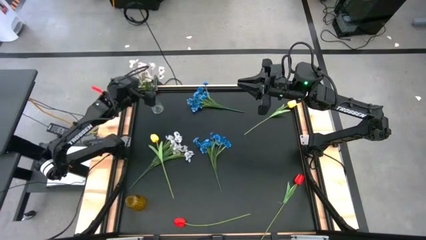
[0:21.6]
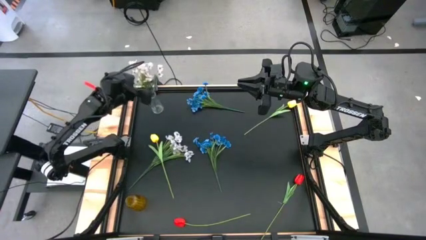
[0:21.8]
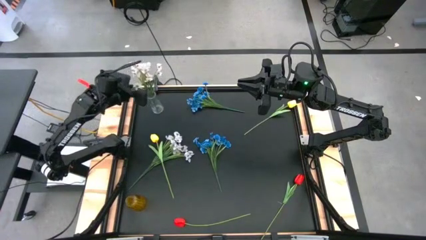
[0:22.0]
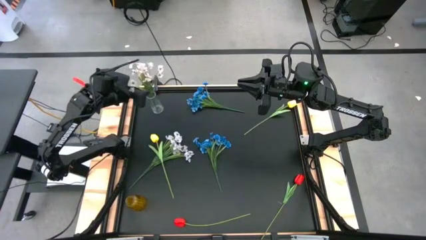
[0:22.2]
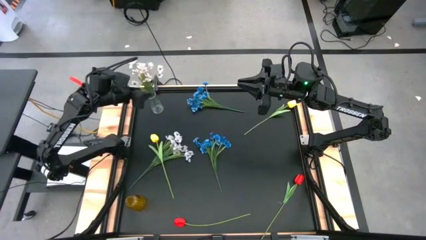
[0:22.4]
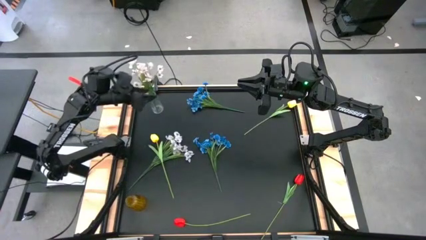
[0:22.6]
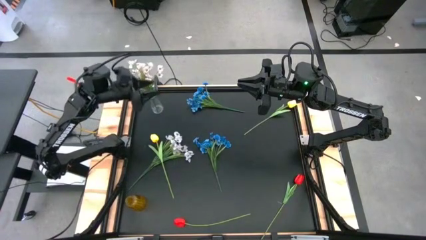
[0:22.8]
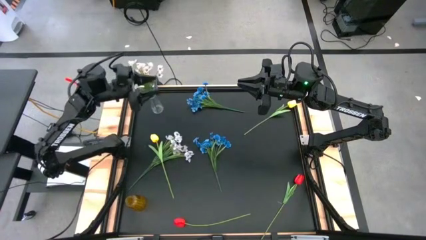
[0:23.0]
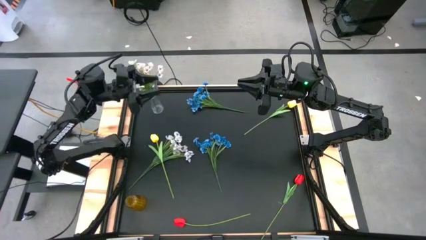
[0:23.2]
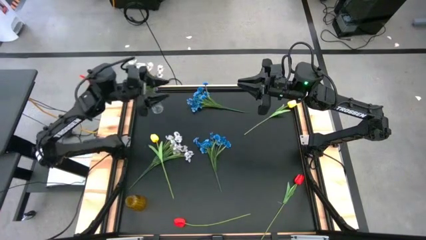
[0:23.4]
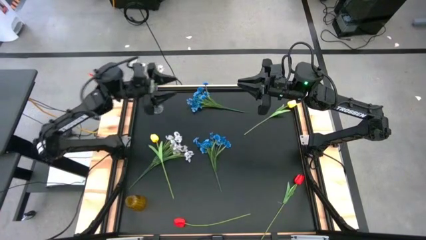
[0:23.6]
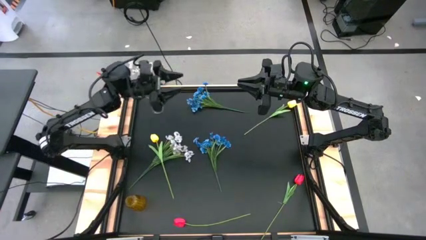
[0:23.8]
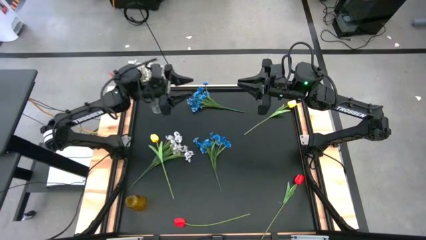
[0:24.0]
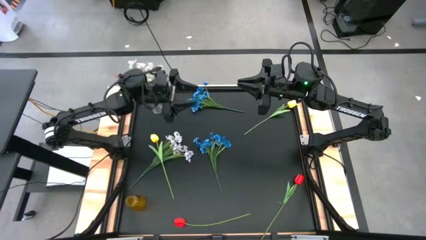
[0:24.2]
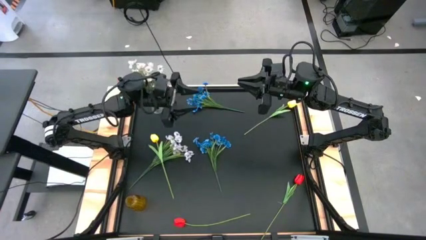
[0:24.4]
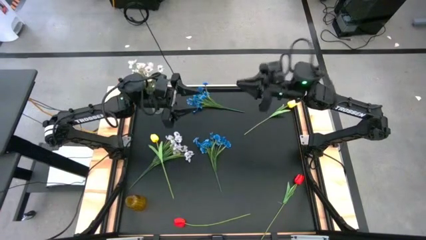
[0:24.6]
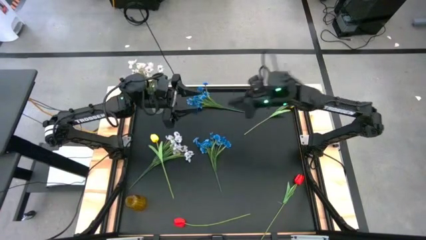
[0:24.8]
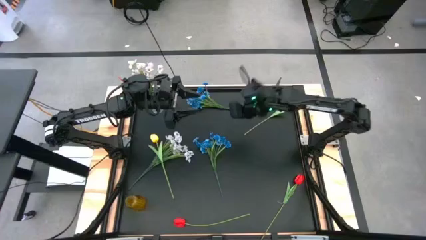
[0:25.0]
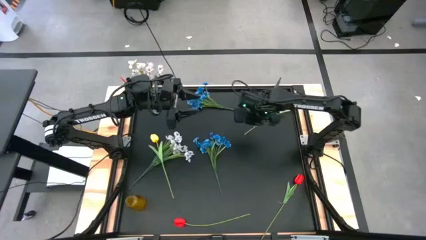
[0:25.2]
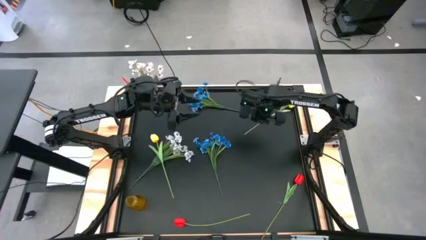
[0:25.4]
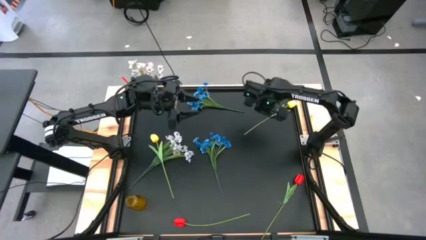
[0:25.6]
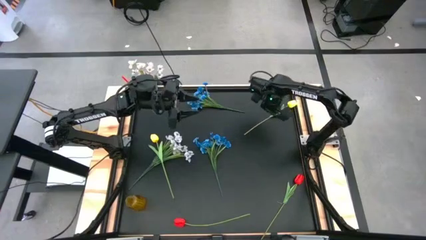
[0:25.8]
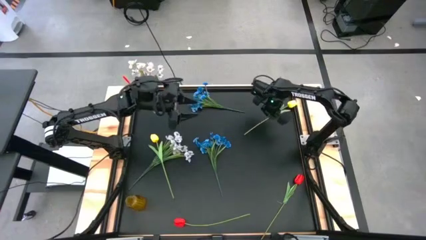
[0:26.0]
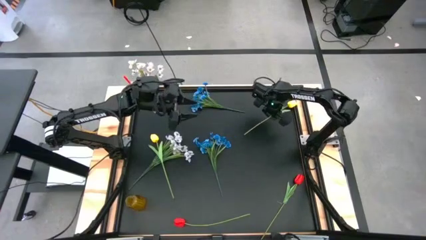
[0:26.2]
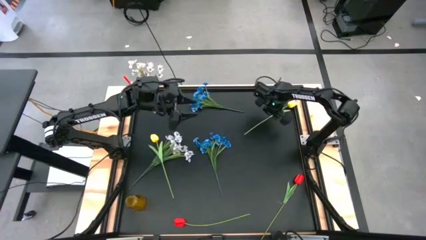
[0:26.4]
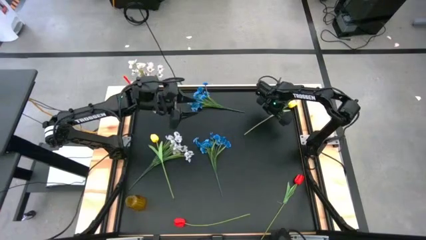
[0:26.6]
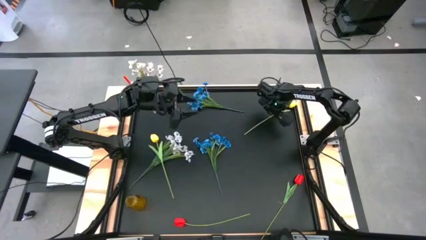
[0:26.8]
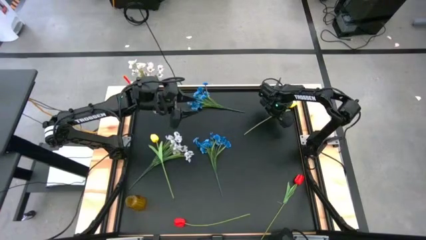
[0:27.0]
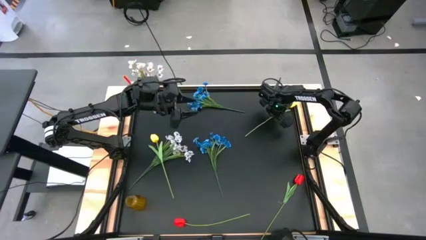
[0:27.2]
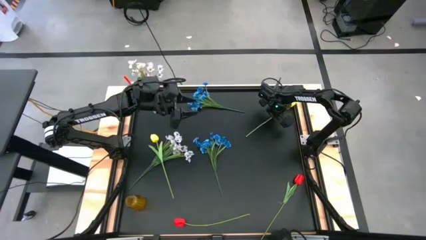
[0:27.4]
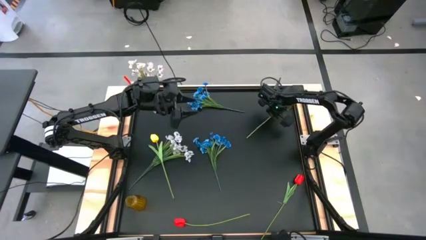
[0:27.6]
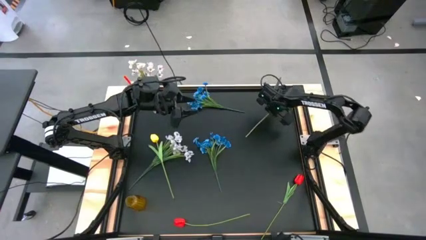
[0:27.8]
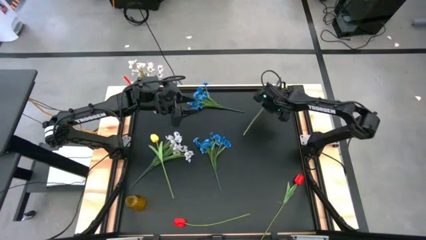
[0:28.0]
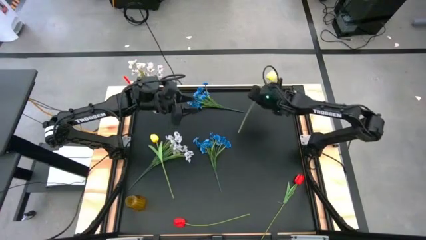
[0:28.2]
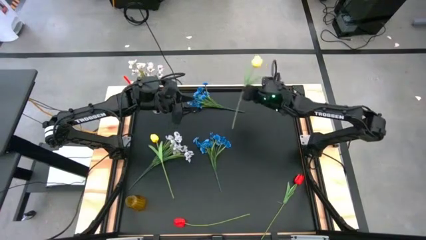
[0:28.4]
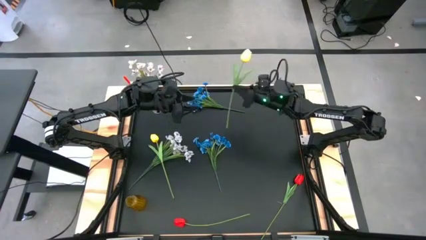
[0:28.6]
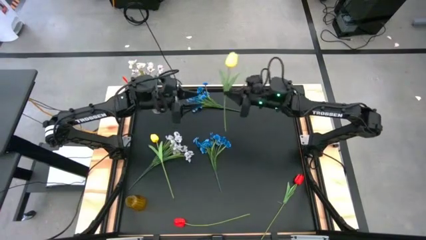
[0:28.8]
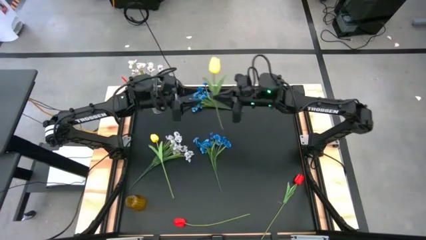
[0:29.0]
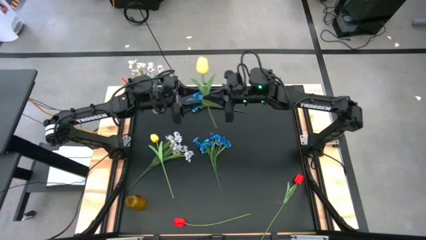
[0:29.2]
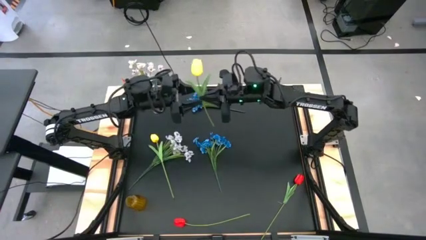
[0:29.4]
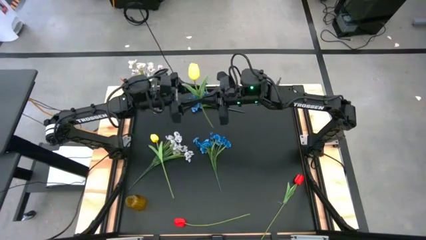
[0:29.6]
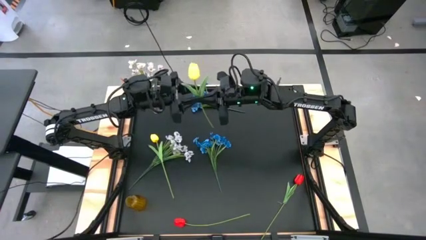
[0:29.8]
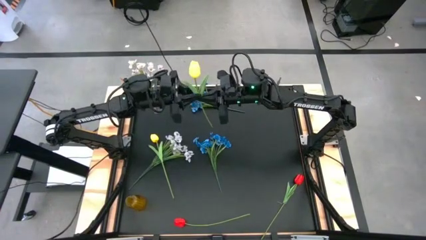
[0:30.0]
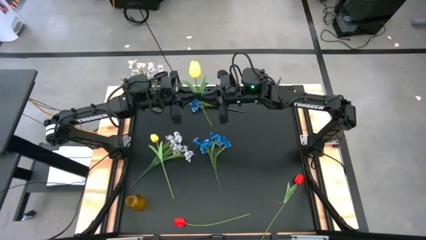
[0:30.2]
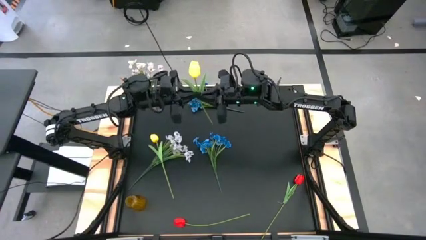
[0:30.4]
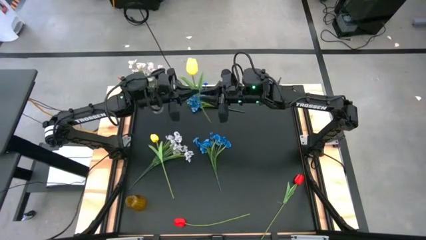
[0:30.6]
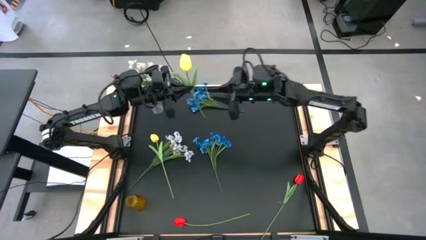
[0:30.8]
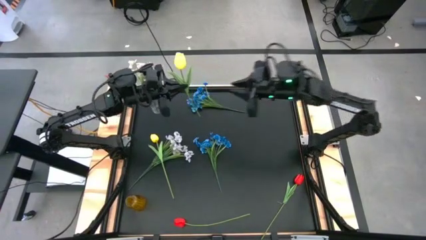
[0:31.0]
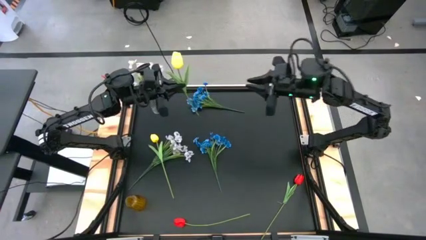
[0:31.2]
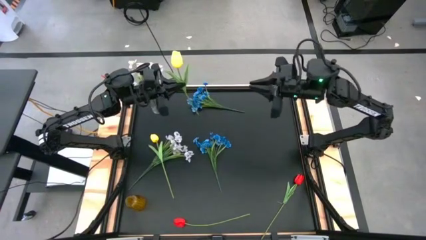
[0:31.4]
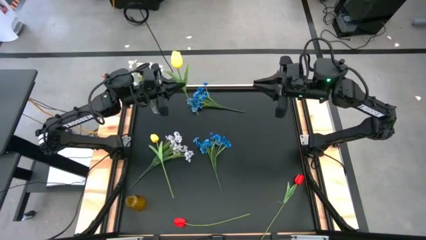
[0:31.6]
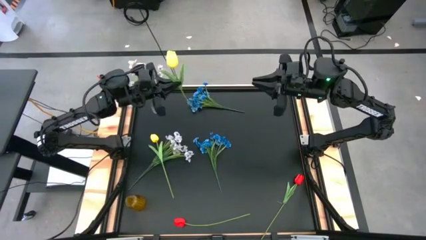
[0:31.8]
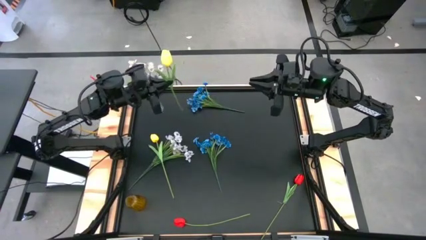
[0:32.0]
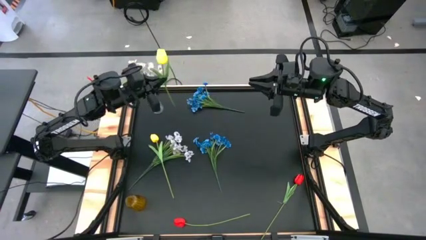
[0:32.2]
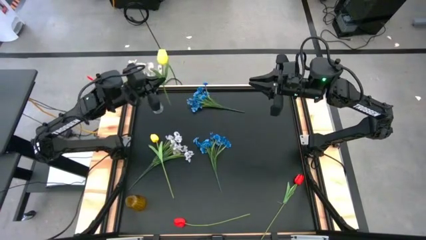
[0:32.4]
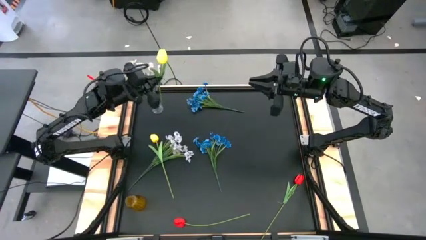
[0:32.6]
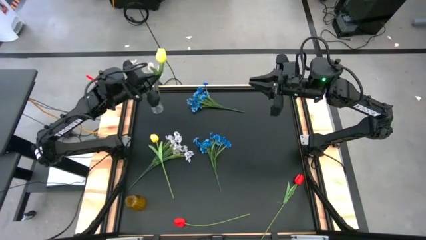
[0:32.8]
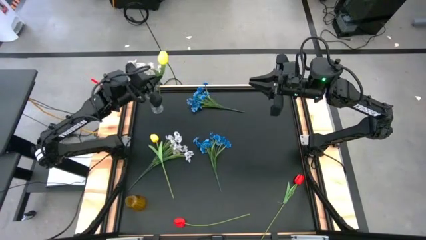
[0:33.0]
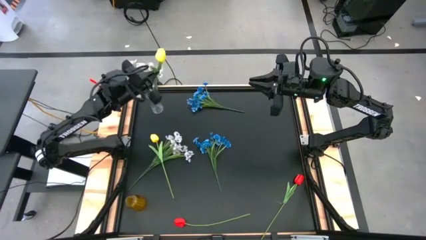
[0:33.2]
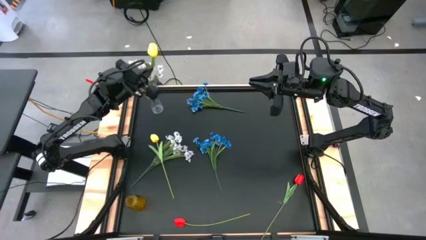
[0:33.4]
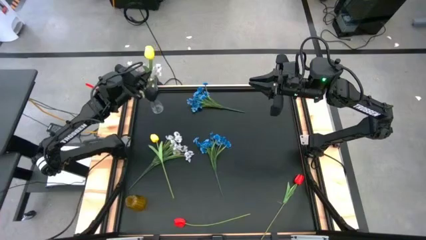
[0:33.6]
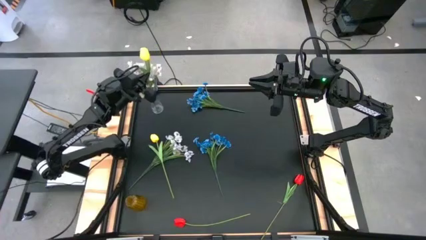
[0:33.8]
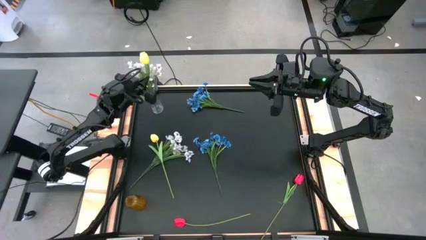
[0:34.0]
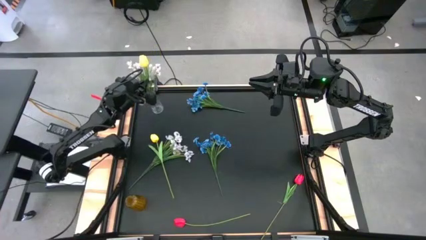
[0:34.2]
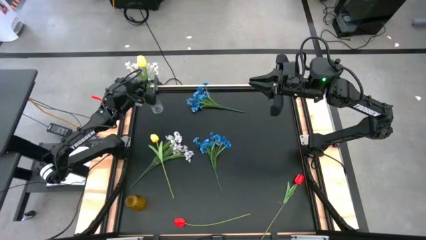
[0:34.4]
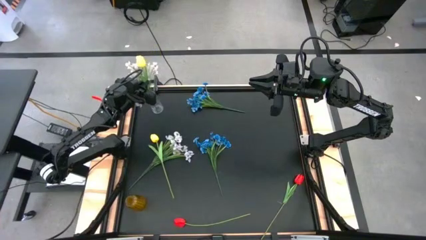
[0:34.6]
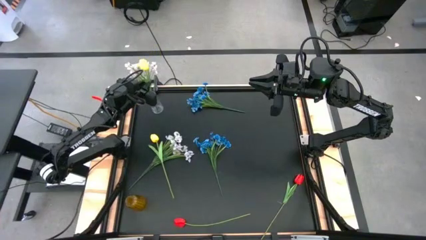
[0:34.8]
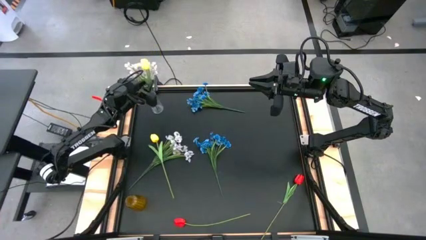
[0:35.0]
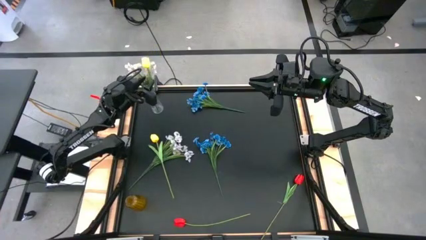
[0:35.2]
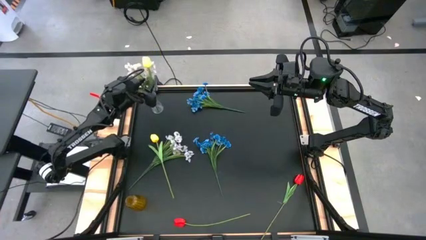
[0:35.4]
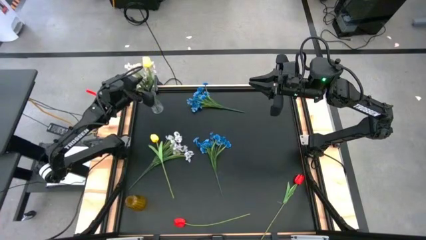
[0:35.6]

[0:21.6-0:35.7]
Task: Sort flowers into vase by color
Put the right yellow flower into the transparent vase
